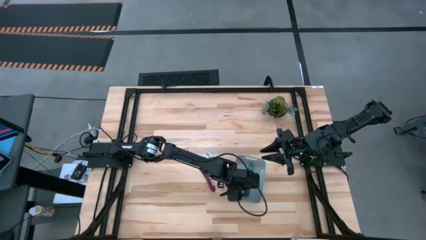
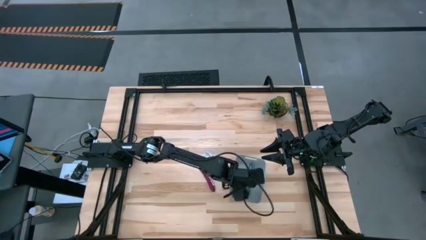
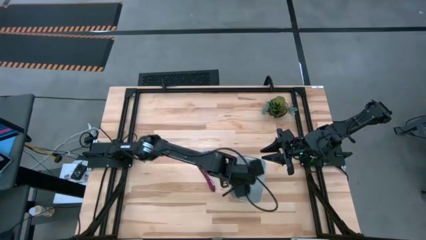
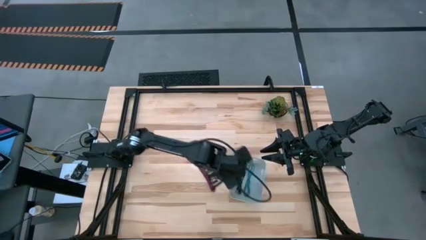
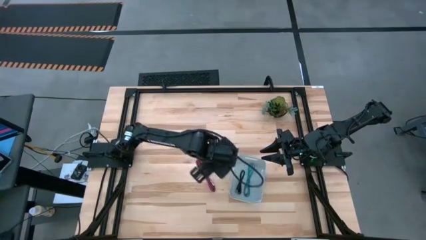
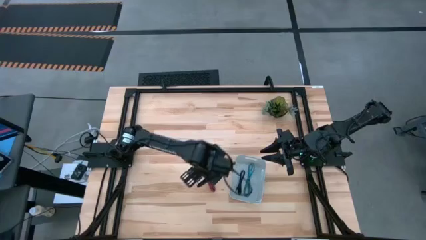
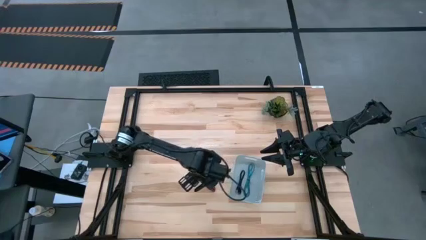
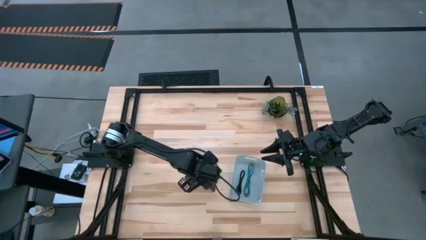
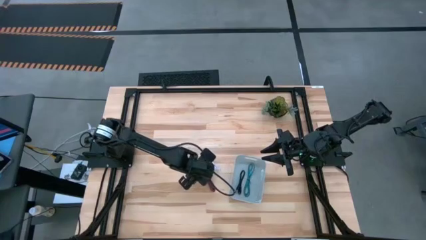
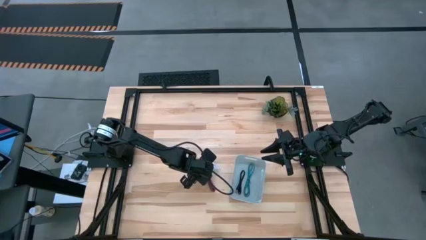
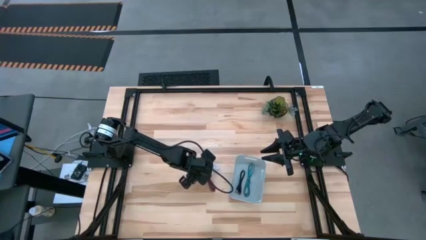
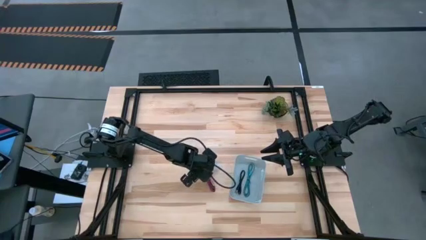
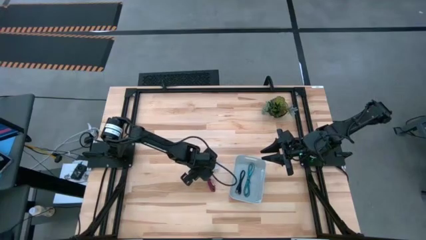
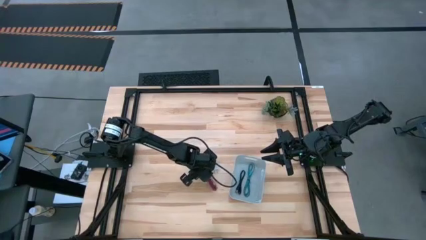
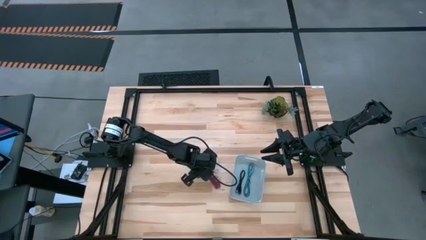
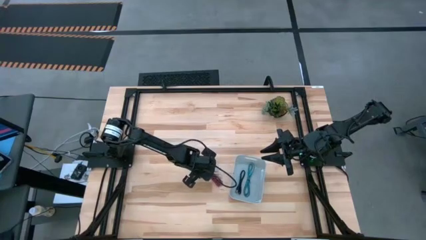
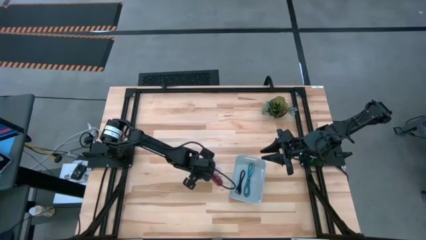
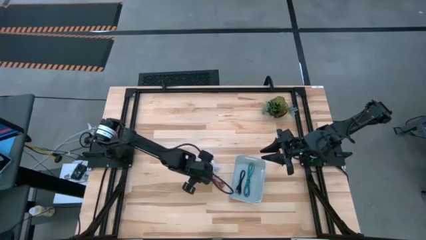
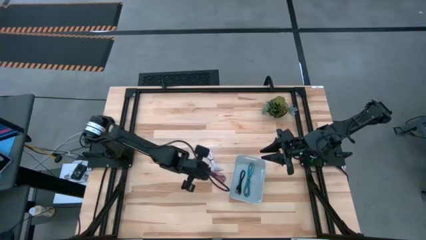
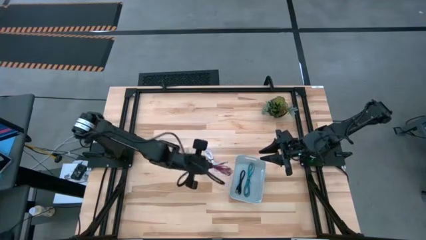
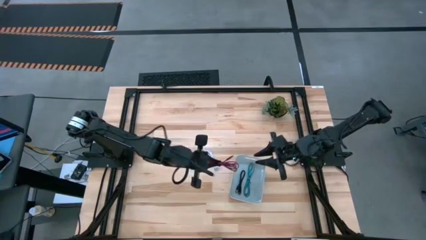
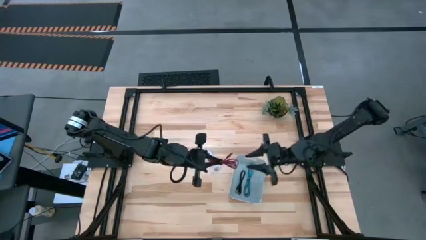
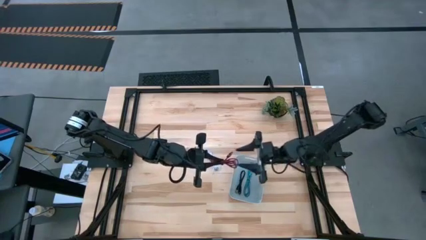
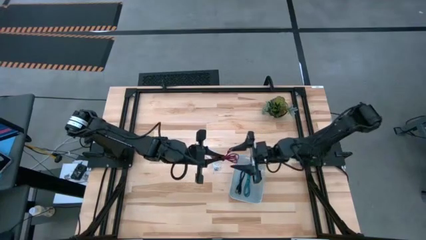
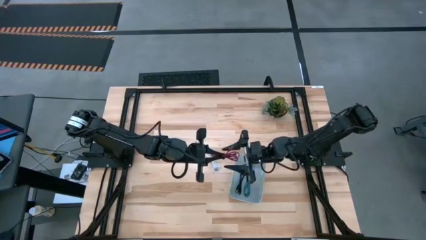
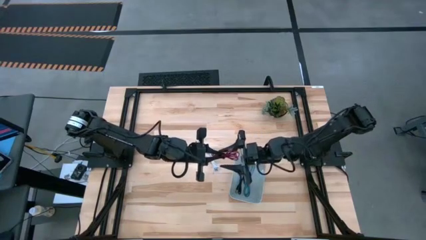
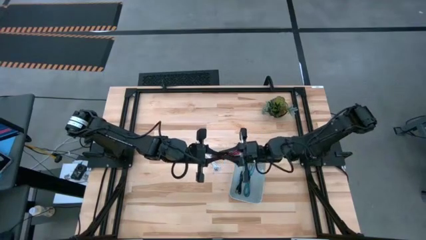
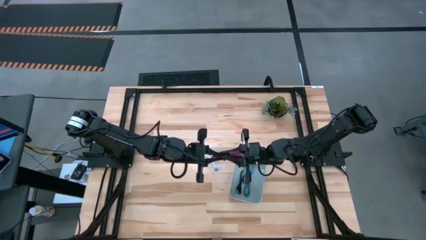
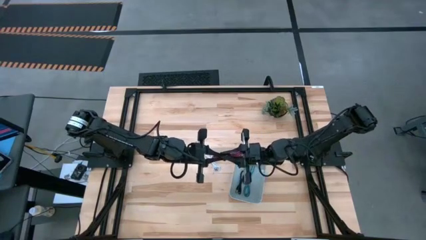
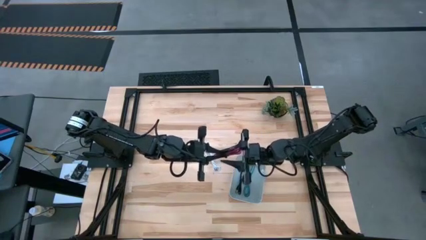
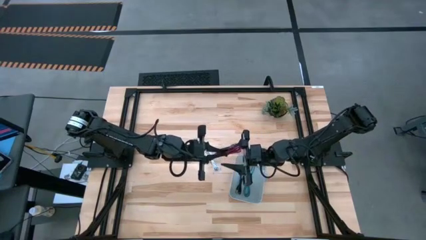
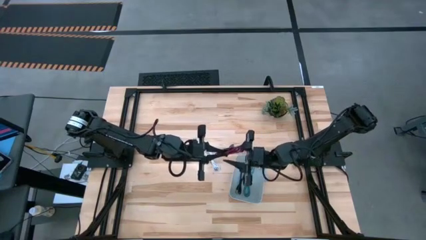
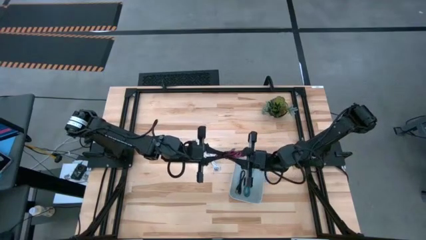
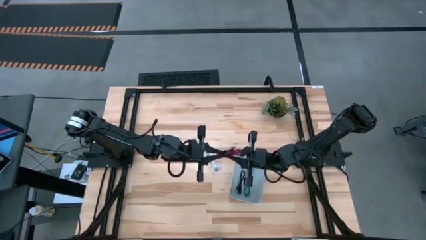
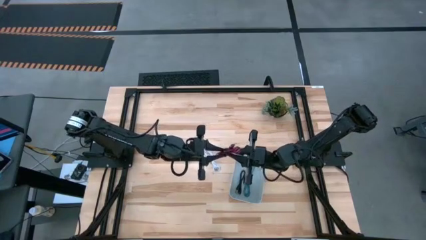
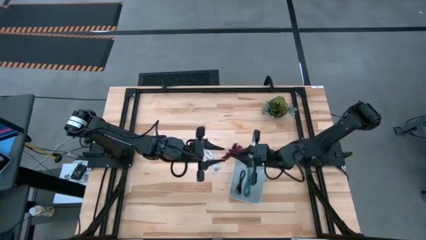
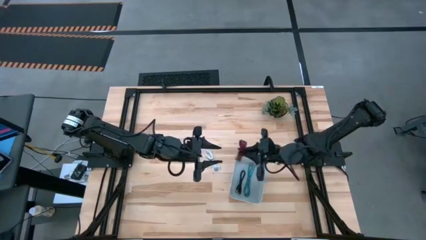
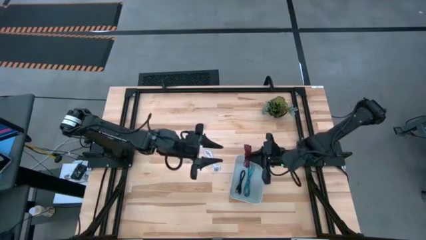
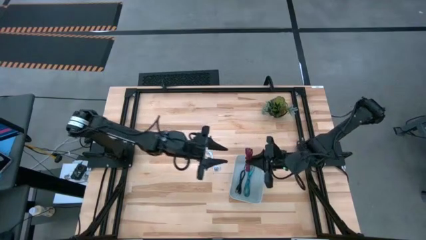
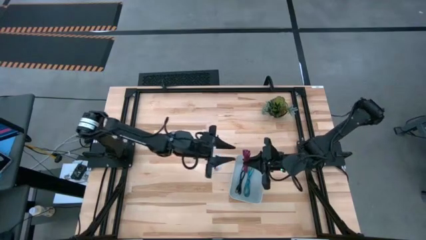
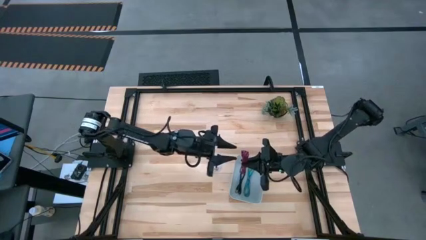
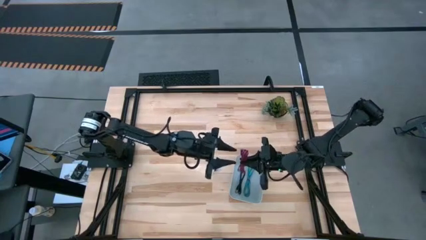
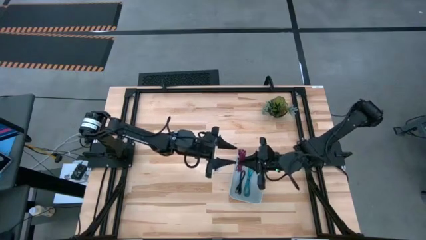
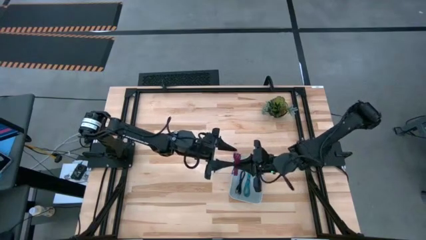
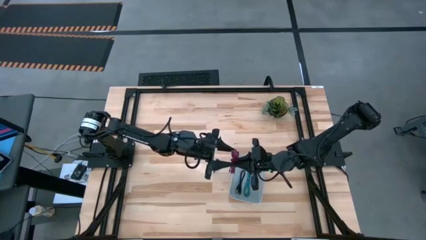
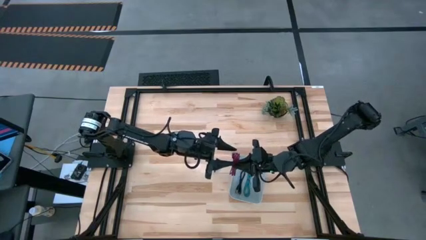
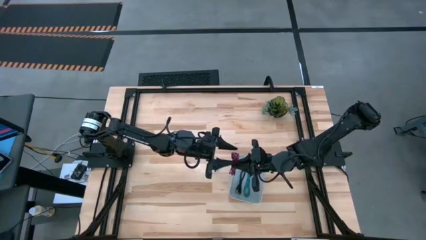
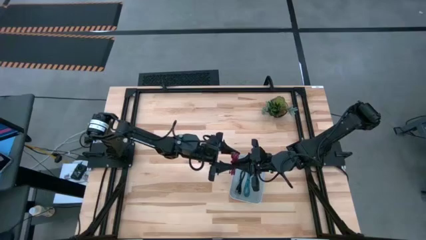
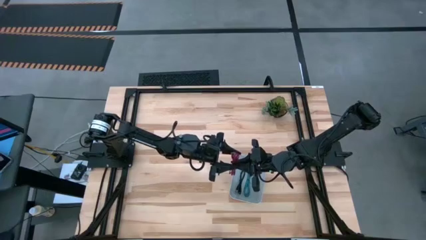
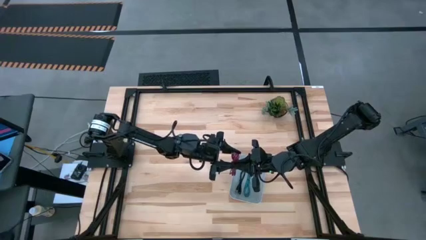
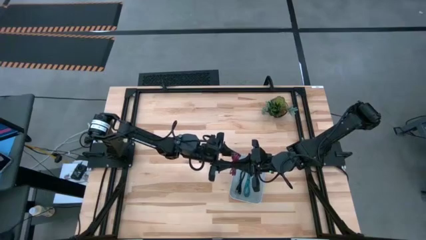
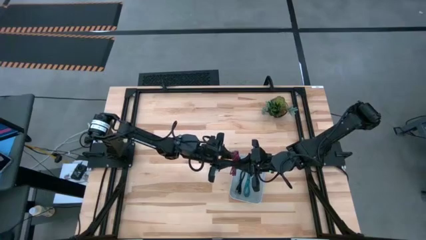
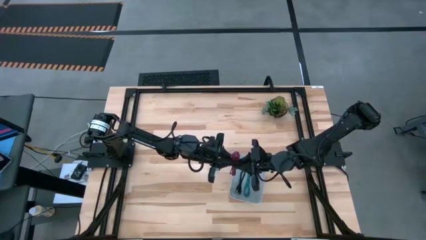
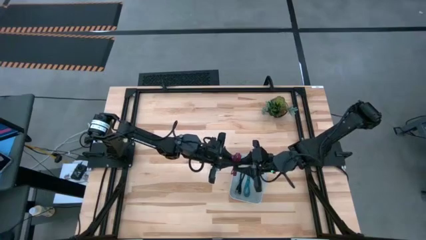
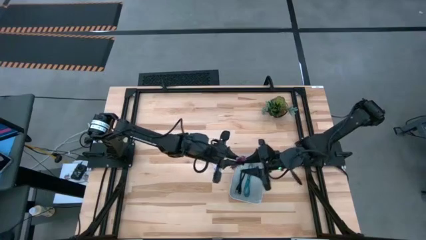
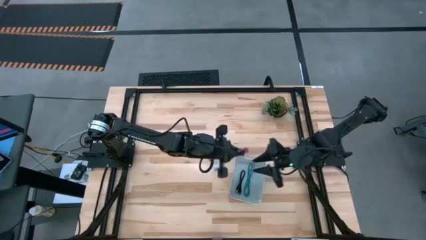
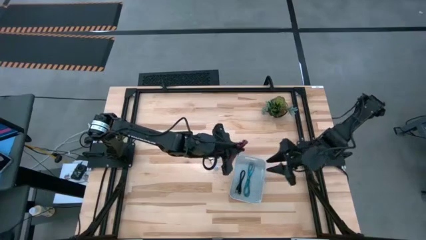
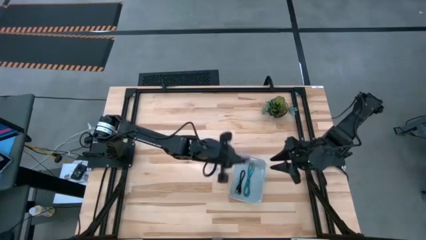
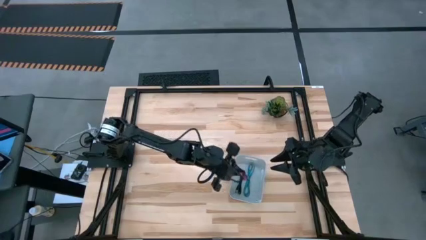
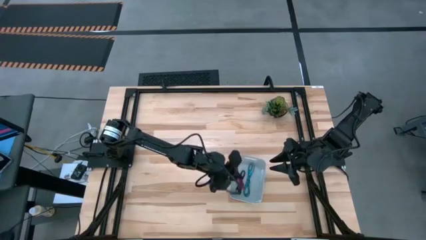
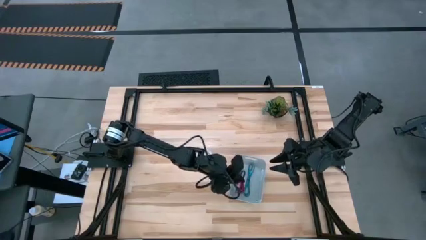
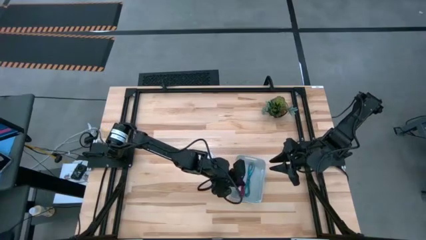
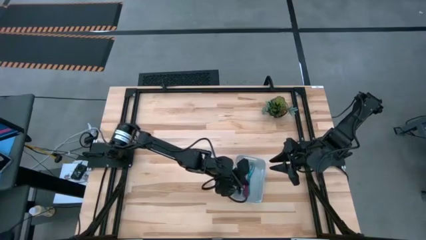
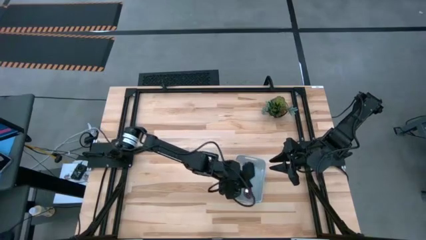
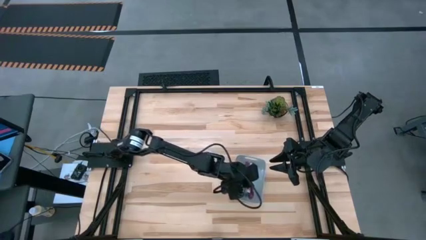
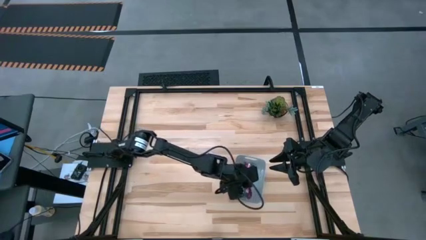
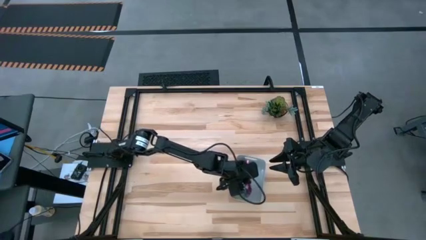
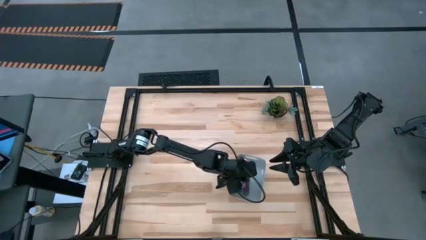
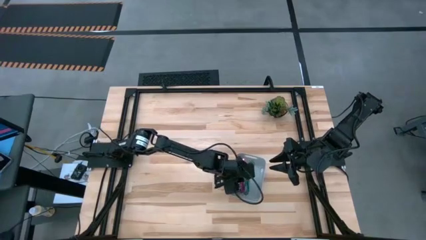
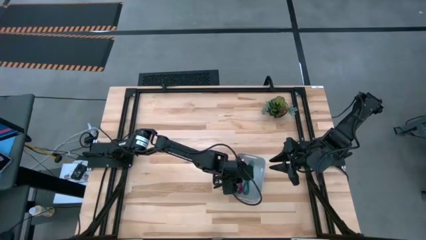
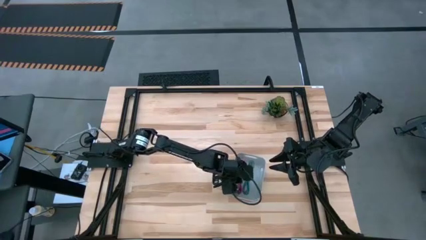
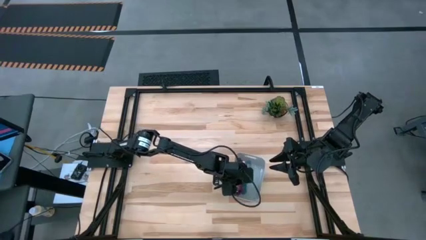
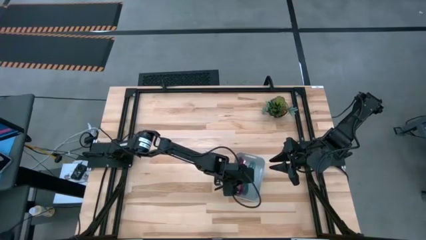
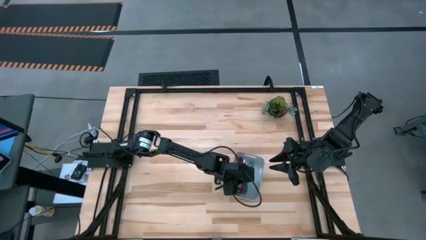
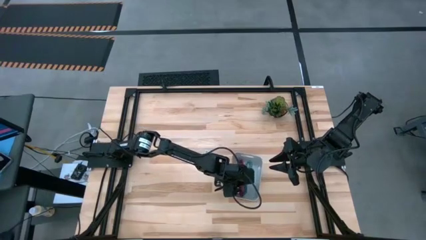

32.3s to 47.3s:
Task: Pick and place USB-C Cables
Put the pink charger cable into the gray bin
